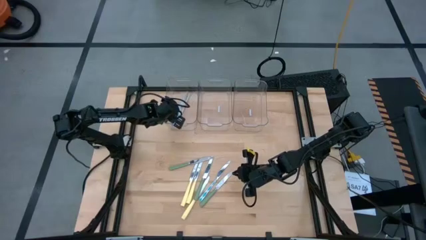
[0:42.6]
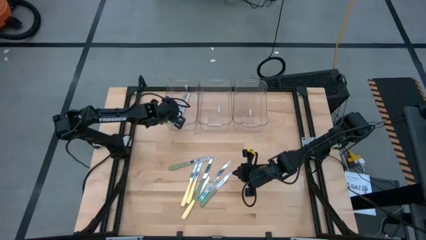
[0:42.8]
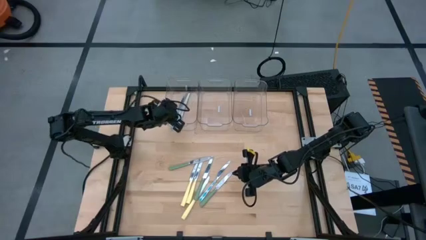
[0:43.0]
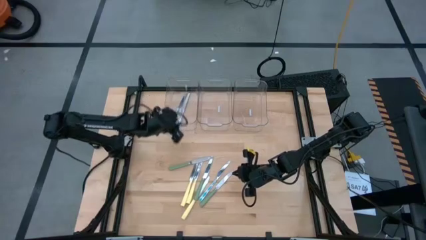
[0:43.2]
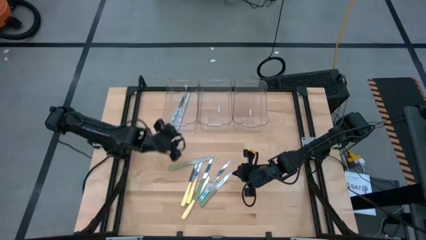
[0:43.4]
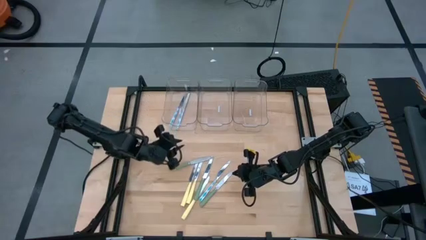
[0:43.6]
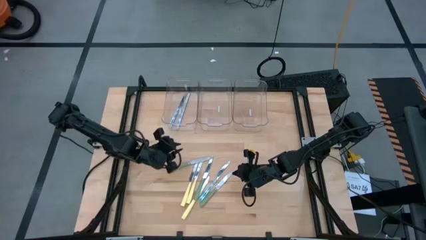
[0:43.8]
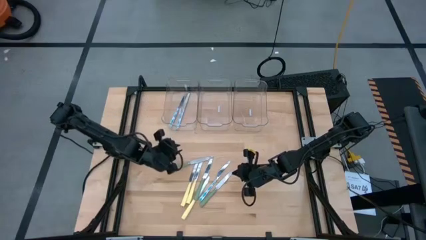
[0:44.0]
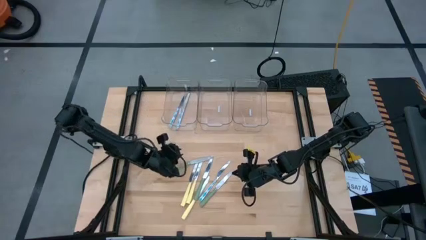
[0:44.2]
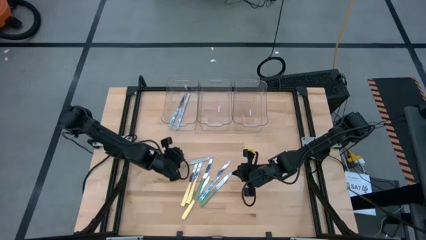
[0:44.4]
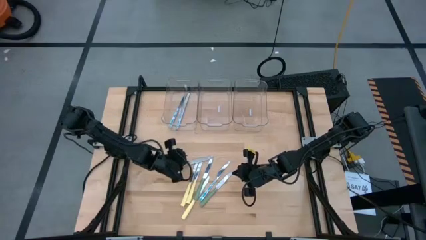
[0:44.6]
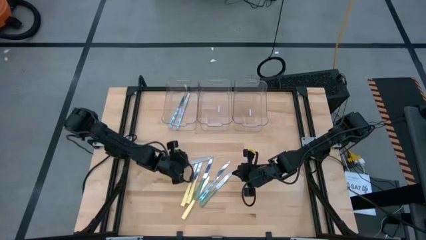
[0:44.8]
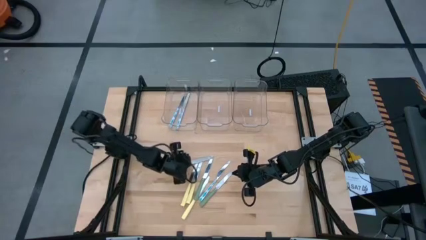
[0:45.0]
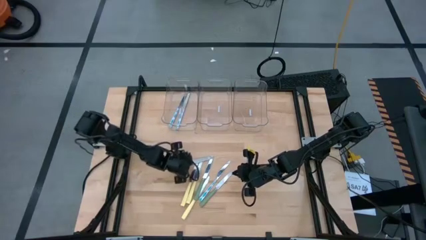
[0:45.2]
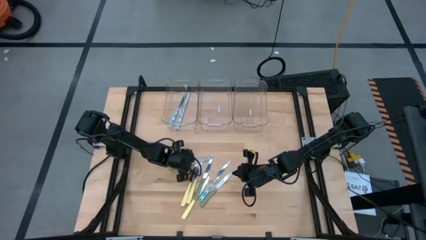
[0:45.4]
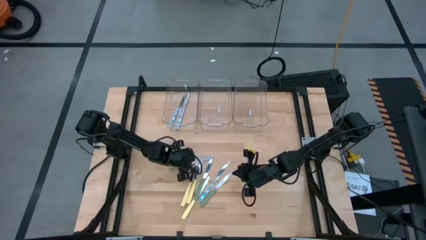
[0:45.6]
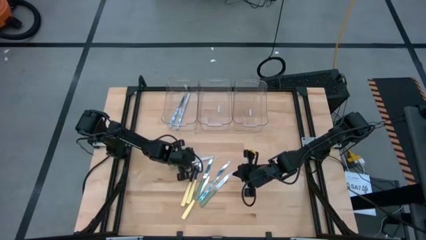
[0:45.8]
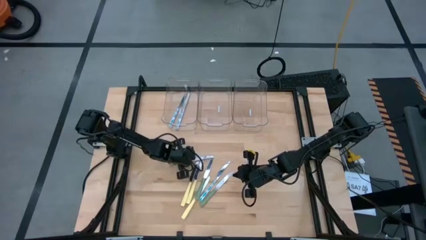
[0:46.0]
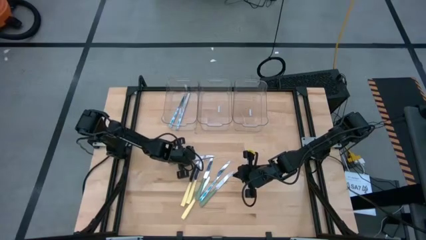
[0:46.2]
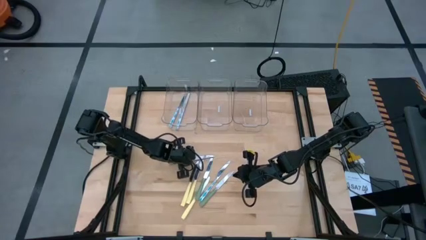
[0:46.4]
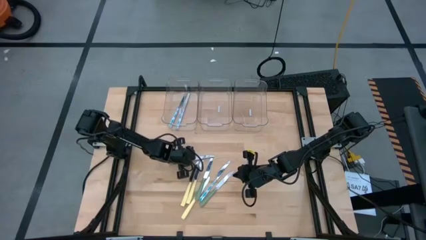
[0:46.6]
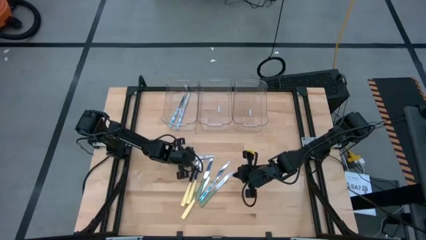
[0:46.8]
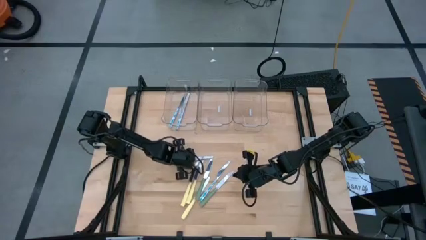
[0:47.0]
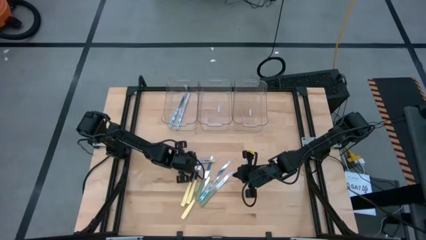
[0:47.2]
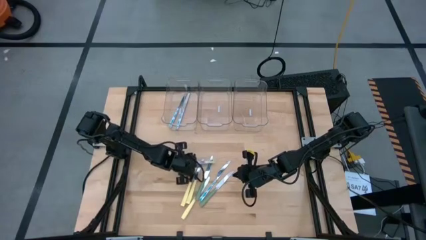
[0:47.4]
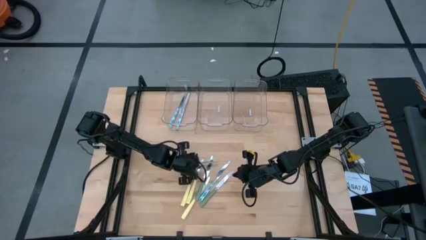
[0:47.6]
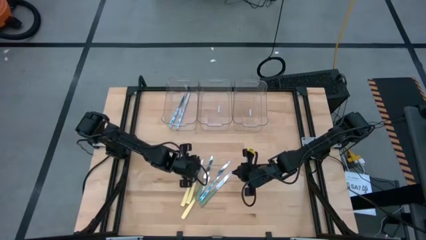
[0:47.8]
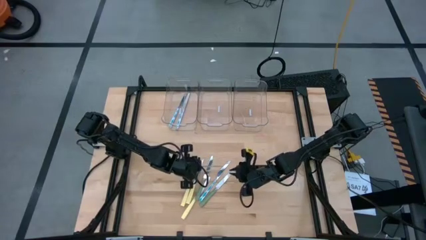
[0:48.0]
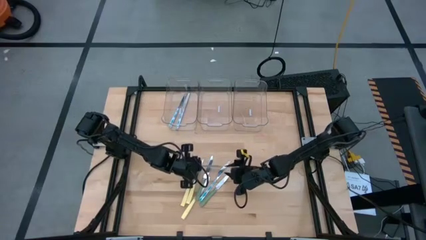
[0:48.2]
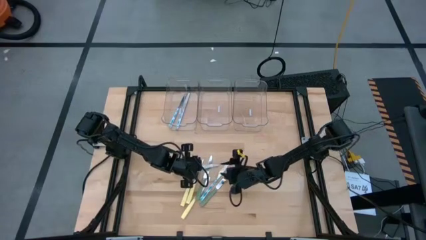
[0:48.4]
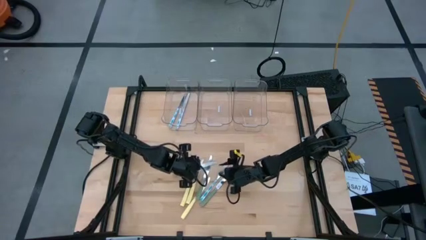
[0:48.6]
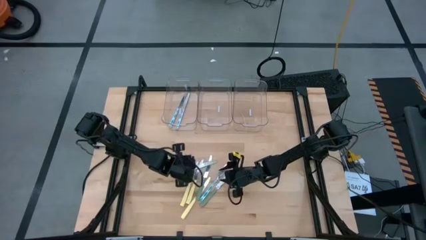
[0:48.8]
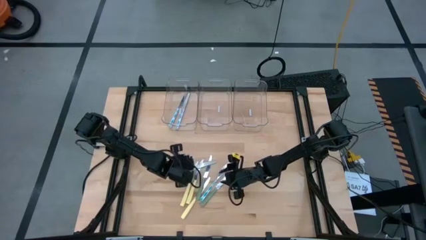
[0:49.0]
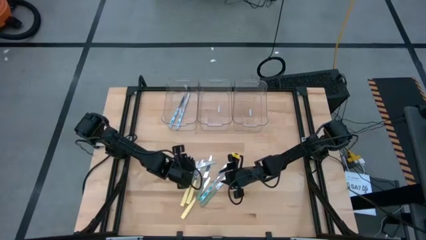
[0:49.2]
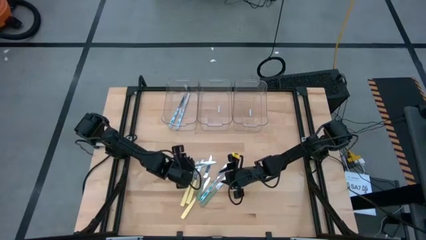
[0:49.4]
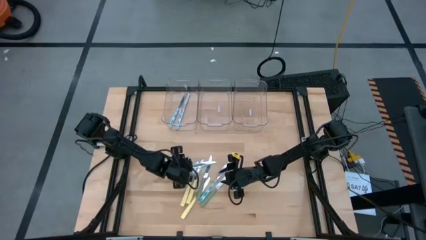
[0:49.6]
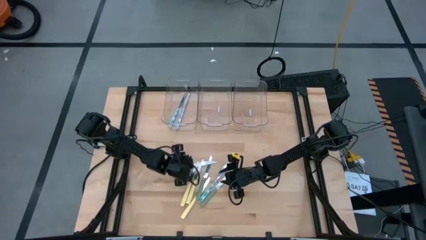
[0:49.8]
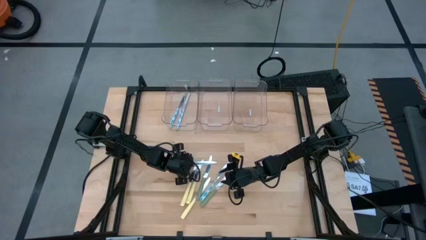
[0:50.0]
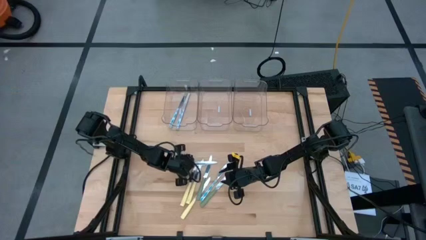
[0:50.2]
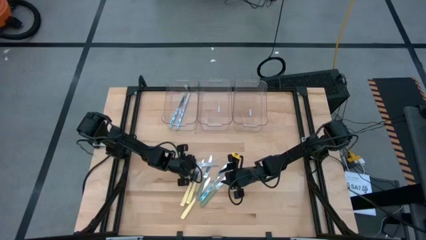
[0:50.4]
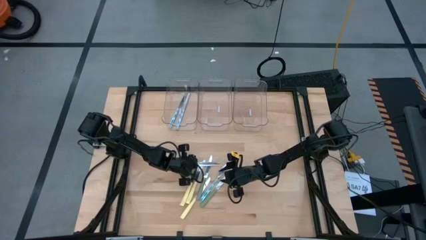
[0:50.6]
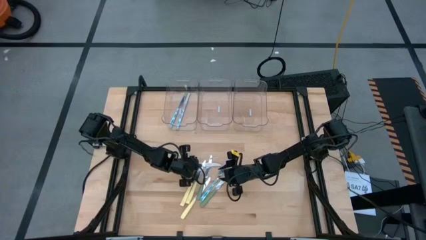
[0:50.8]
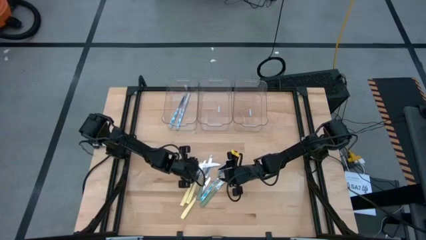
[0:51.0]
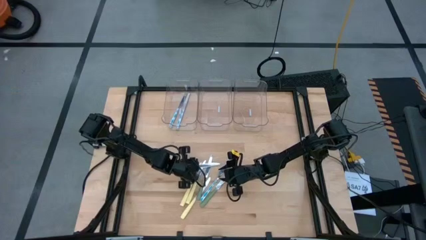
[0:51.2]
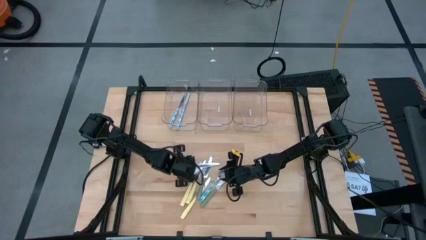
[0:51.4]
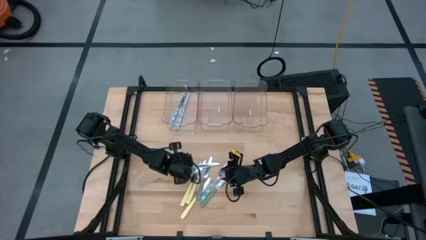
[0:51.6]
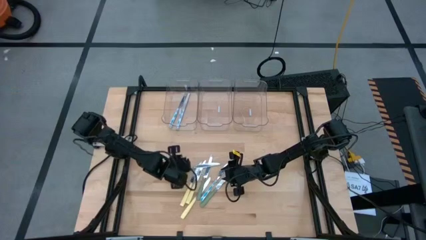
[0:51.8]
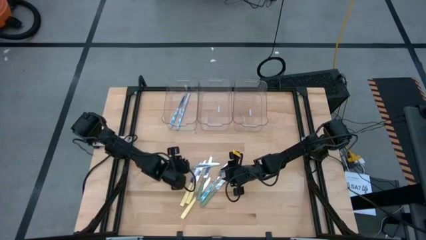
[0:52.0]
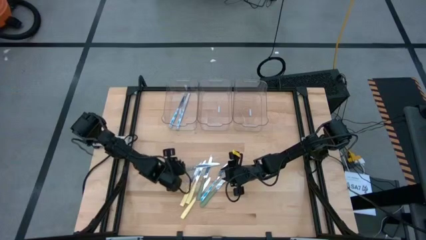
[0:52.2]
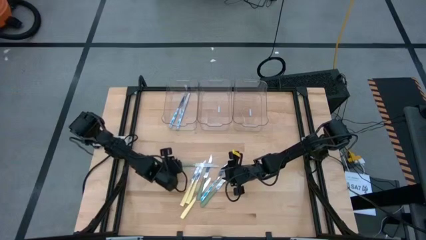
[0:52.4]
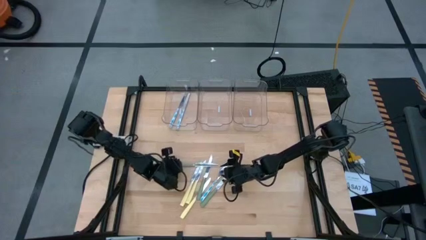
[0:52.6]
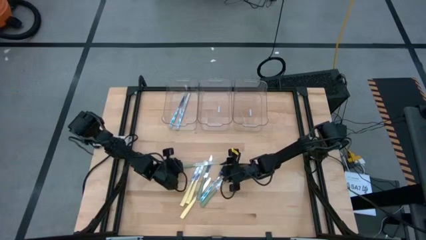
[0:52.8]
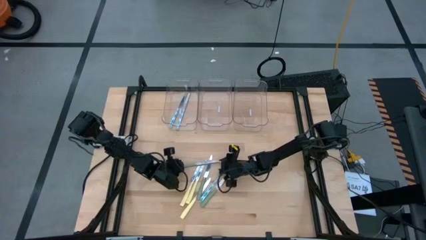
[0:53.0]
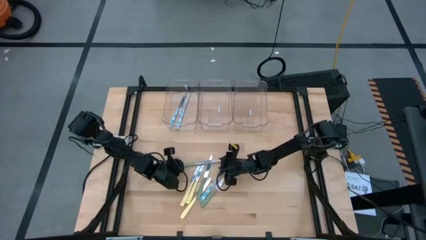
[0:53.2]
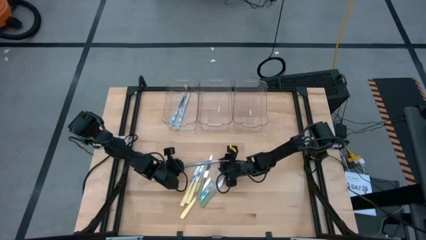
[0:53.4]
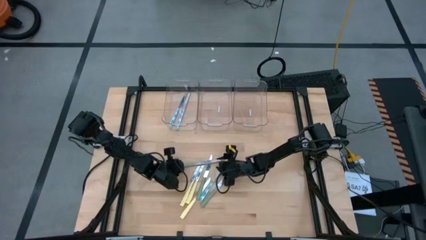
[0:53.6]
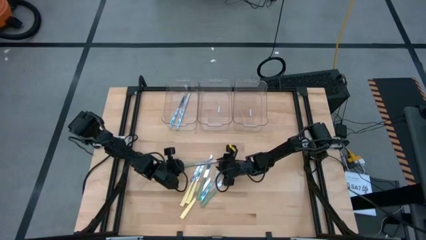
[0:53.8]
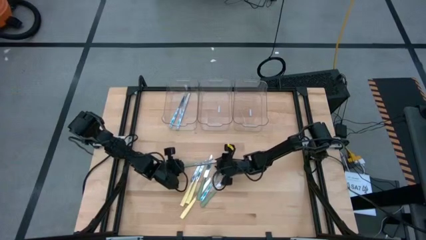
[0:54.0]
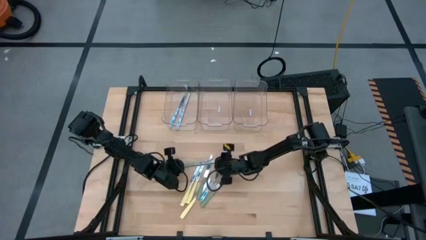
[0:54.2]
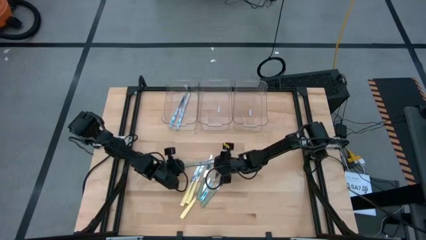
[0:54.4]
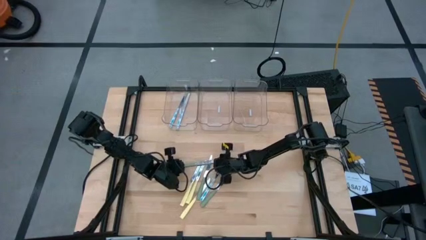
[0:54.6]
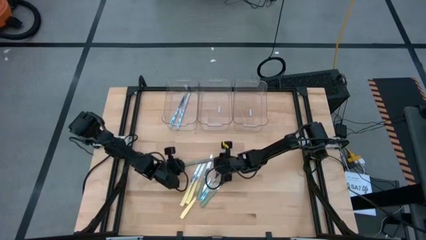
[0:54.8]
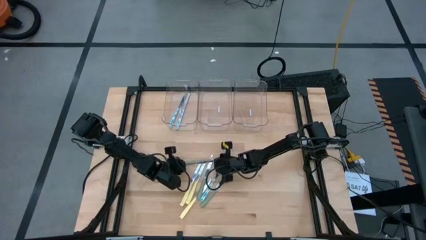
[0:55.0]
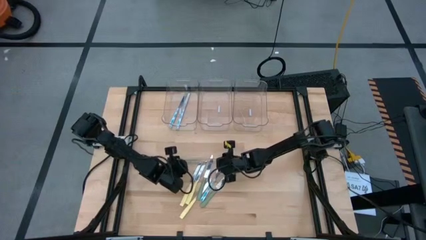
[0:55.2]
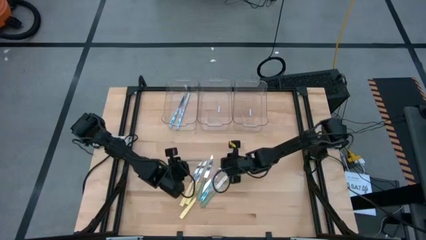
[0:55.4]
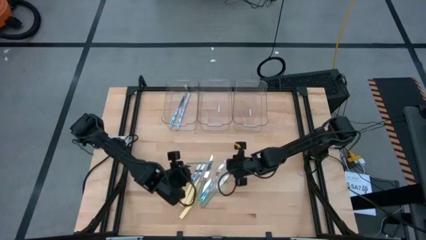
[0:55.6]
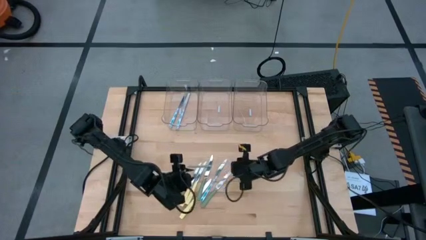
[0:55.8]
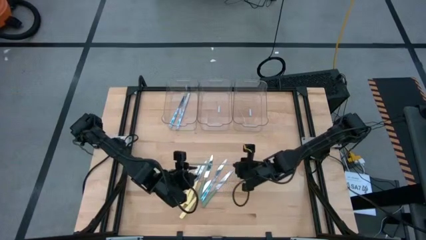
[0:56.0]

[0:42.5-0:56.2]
Task: Sort silverware by color (type)
Put the green knife into the right transparent bin

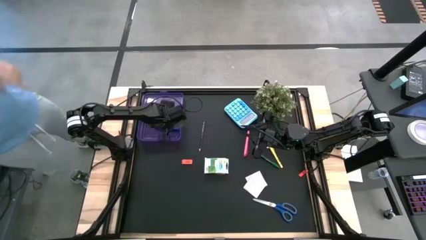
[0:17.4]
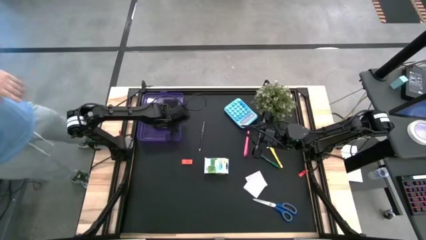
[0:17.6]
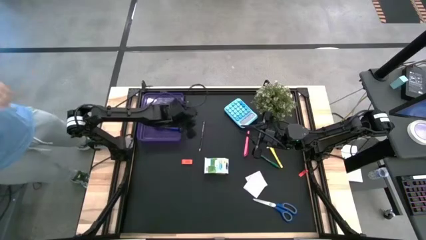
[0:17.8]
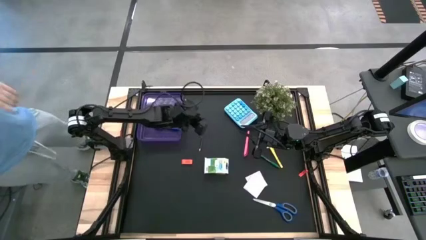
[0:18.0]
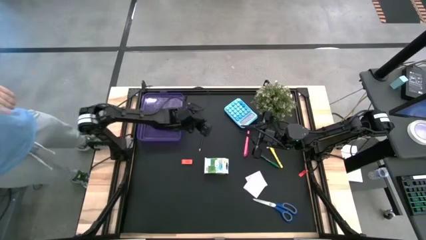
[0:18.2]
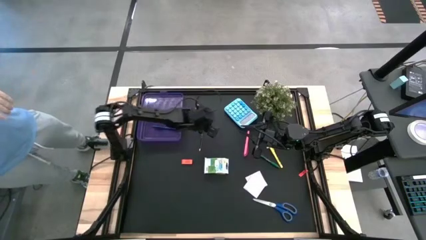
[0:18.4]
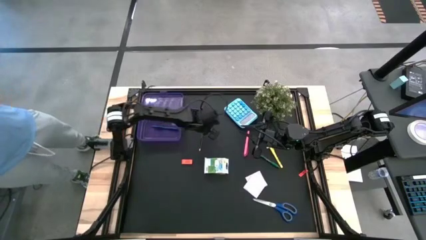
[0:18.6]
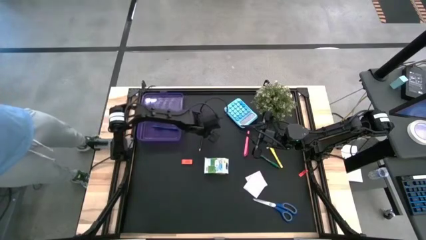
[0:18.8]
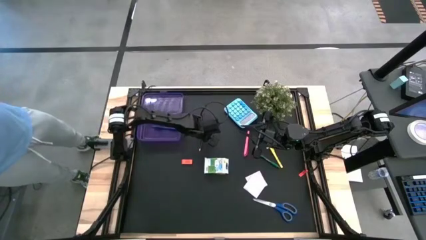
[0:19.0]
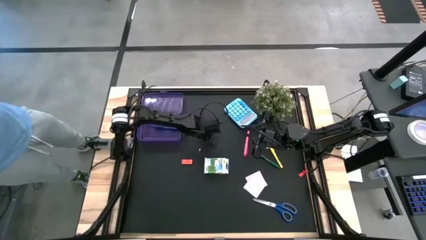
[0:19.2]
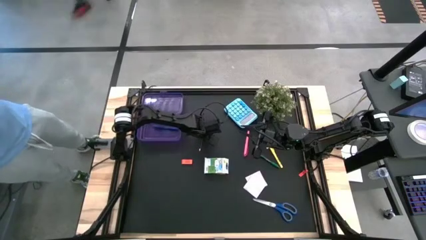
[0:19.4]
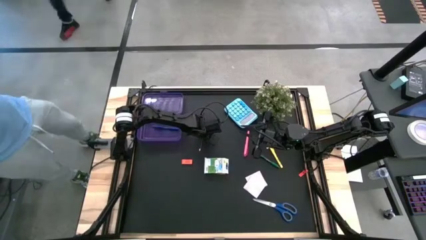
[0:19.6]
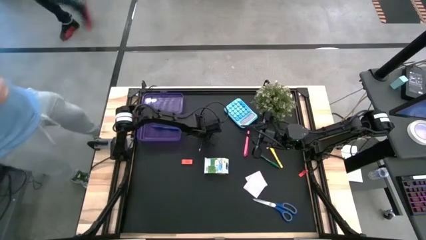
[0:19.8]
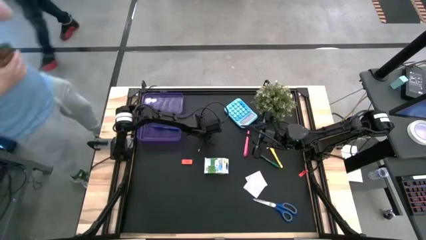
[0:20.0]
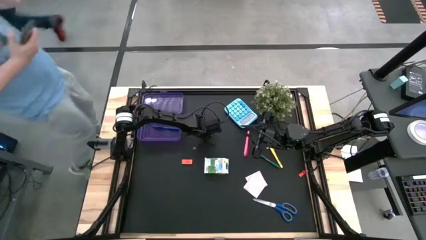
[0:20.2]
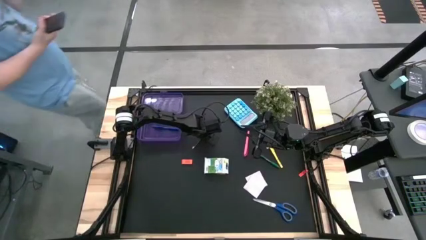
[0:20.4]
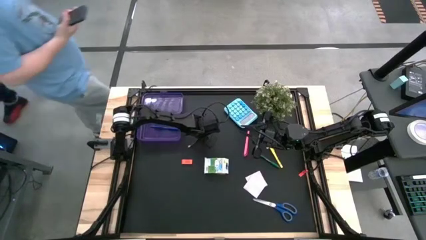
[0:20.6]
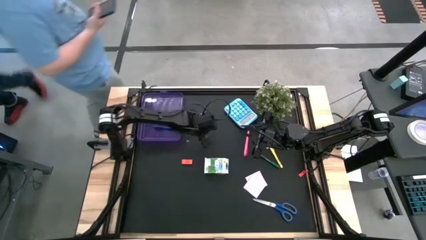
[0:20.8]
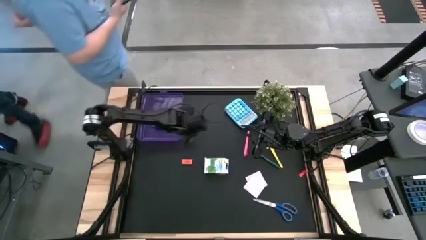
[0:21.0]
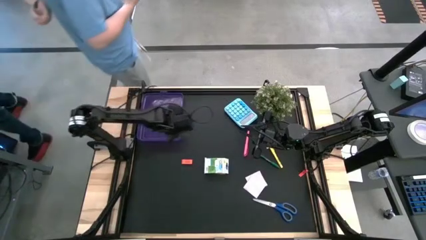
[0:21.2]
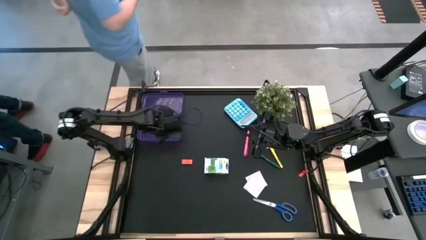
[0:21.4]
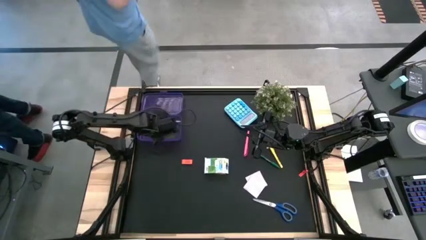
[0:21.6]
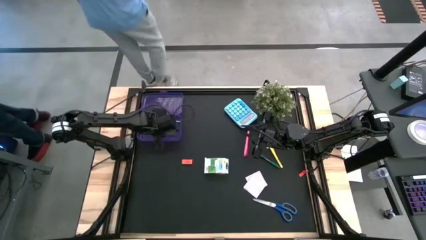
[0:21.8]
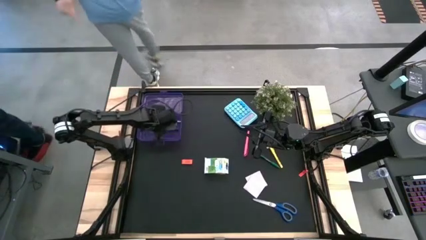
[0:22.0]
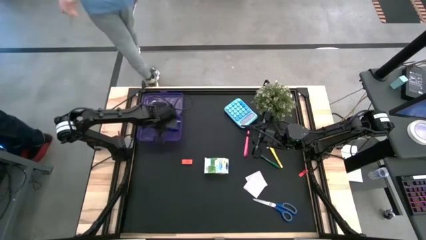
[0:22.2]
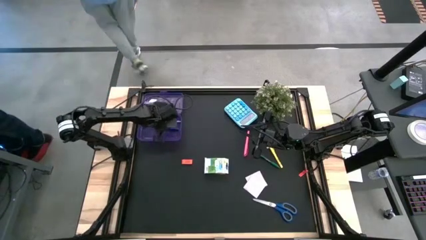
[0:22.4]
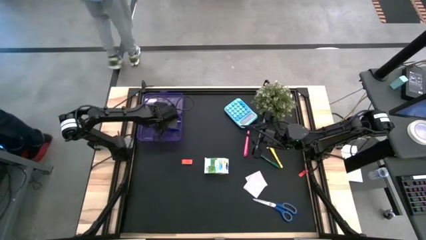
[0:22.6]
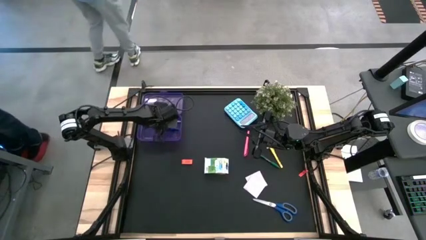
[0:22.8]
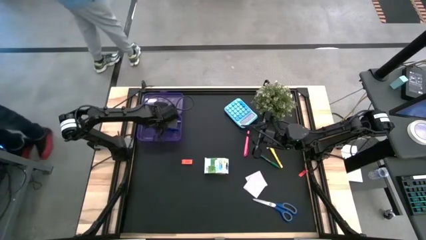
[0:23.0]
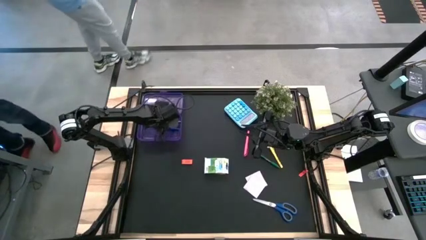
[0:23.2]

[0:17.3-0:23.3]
Task: Pack school essentials
Put the blue pencil into the purple supply box
